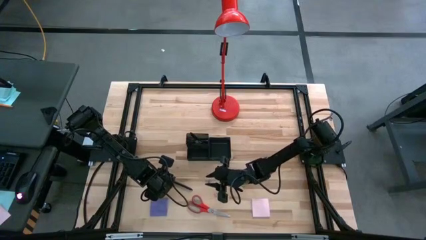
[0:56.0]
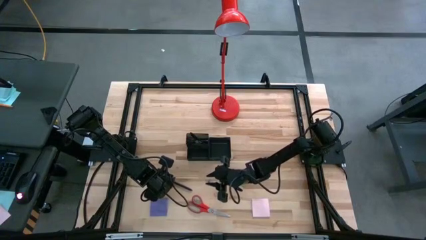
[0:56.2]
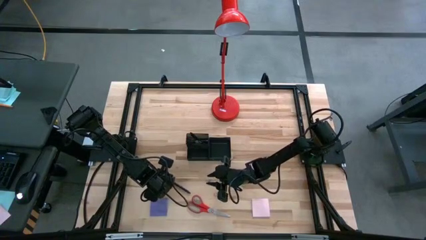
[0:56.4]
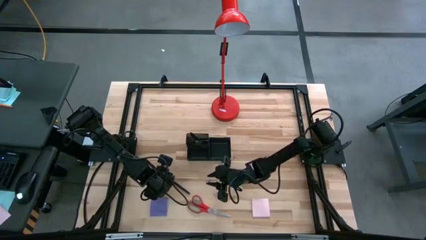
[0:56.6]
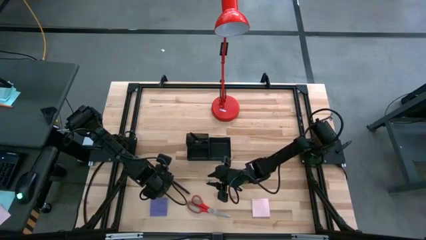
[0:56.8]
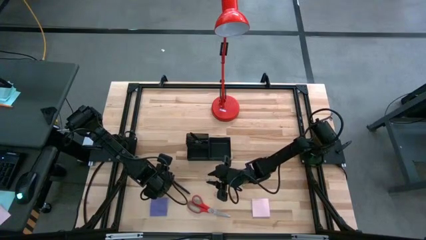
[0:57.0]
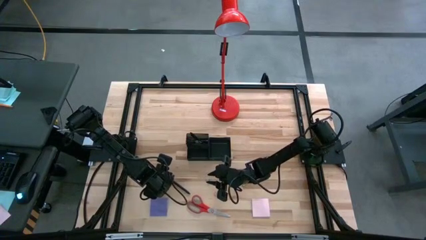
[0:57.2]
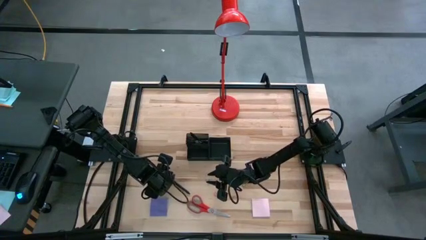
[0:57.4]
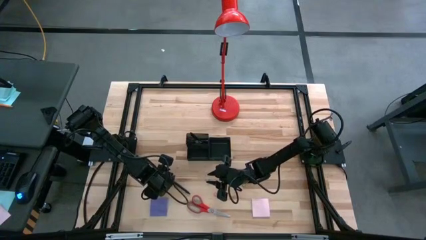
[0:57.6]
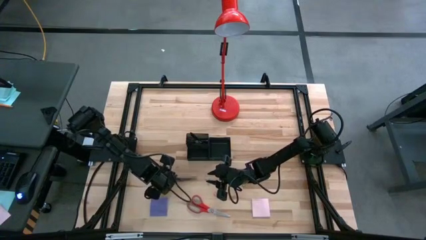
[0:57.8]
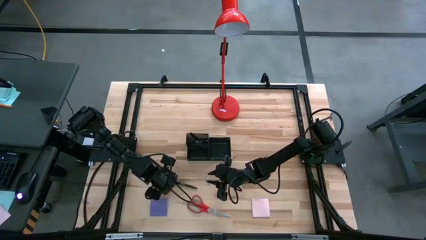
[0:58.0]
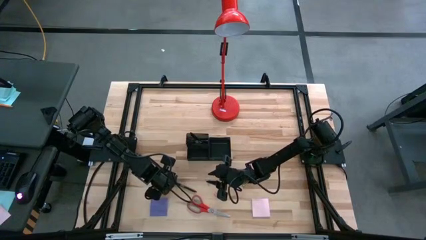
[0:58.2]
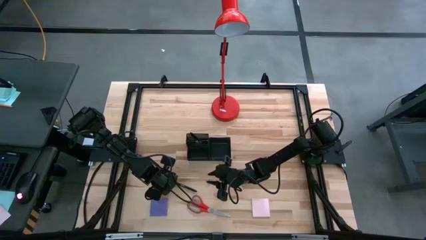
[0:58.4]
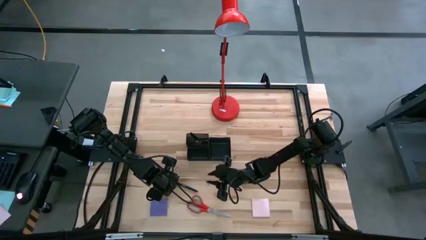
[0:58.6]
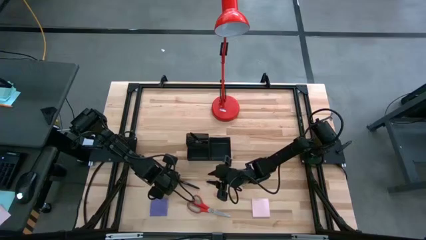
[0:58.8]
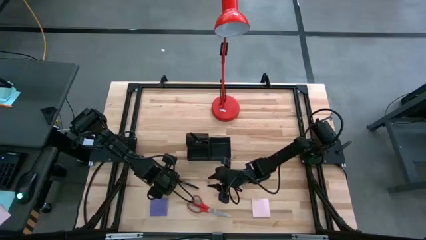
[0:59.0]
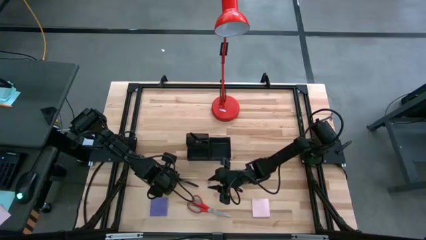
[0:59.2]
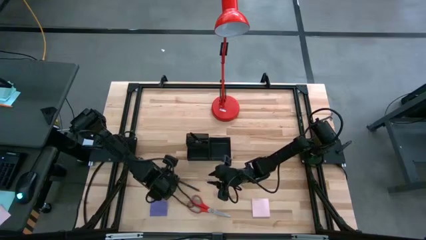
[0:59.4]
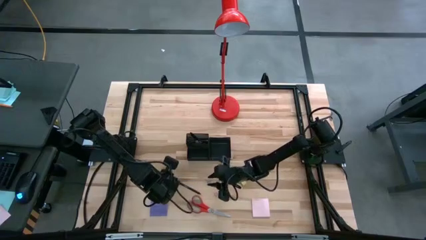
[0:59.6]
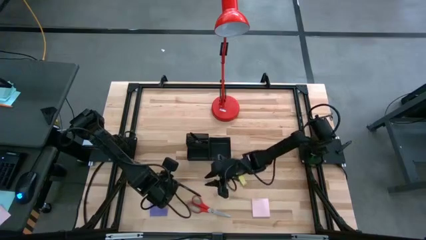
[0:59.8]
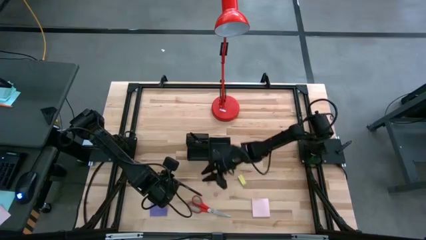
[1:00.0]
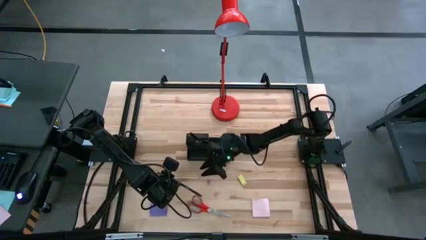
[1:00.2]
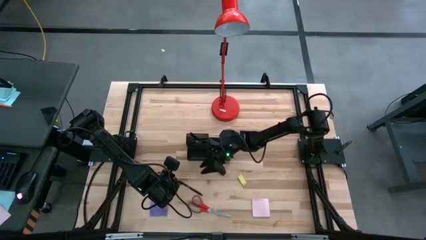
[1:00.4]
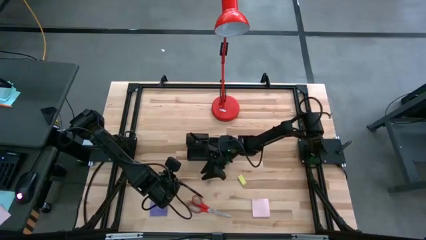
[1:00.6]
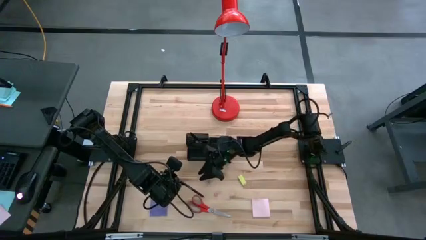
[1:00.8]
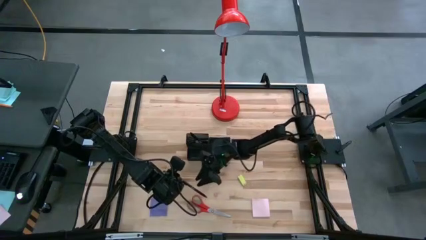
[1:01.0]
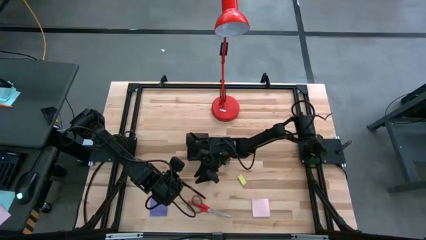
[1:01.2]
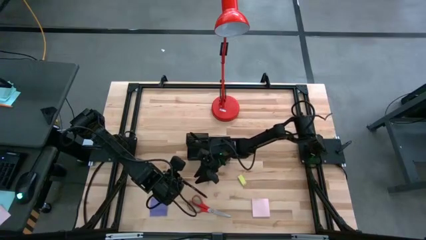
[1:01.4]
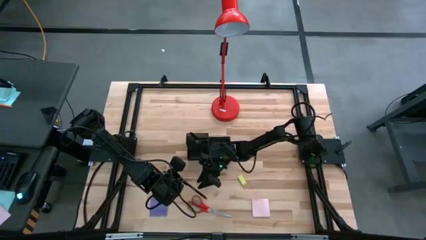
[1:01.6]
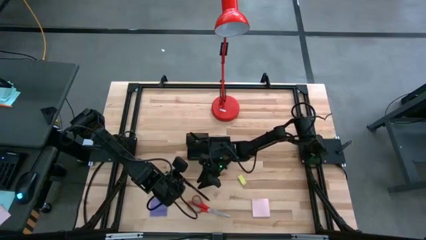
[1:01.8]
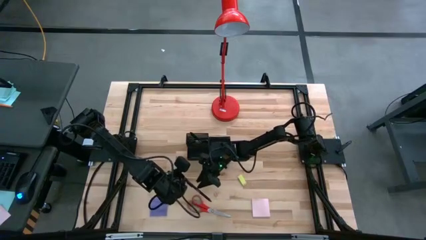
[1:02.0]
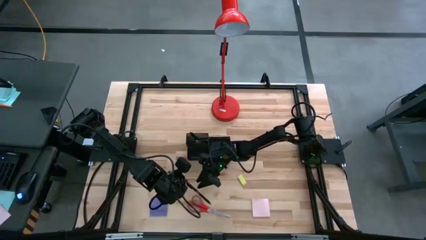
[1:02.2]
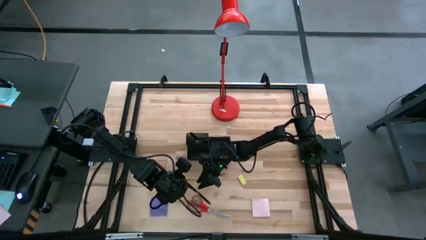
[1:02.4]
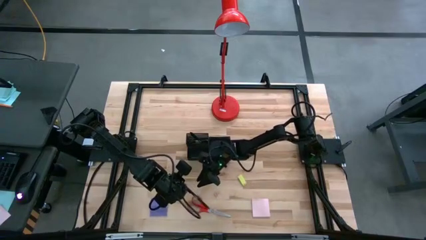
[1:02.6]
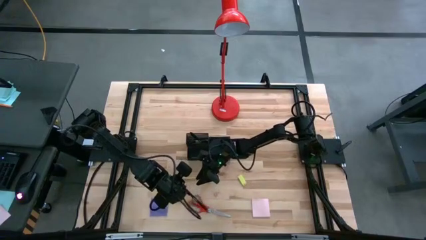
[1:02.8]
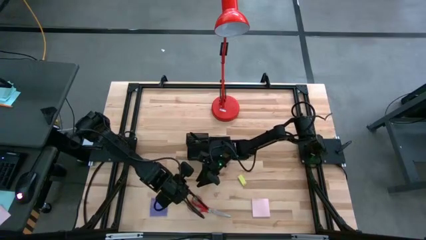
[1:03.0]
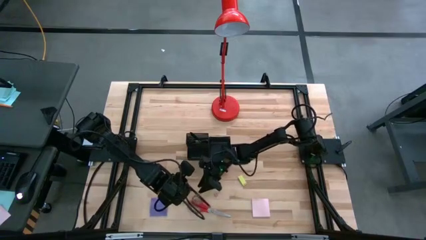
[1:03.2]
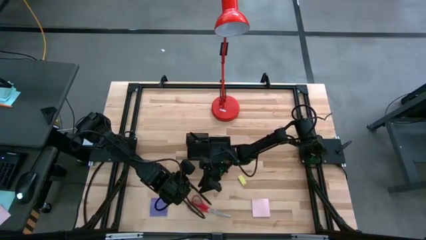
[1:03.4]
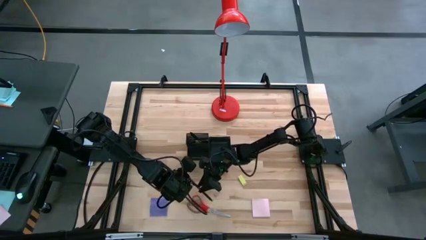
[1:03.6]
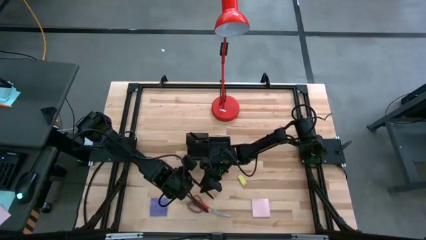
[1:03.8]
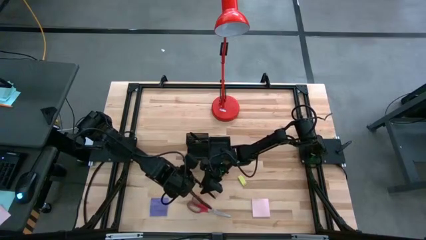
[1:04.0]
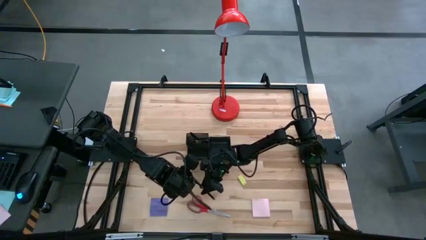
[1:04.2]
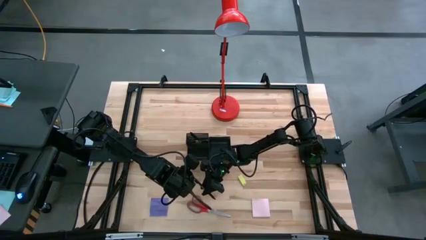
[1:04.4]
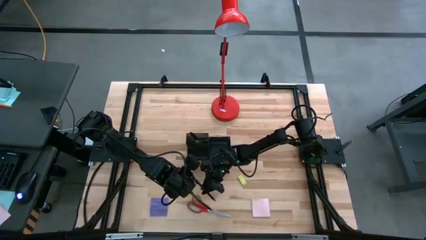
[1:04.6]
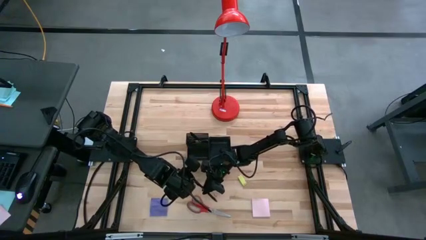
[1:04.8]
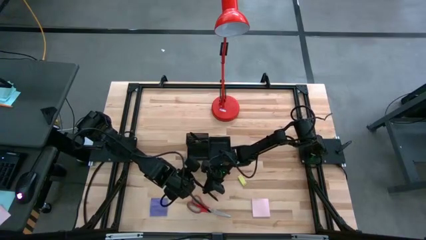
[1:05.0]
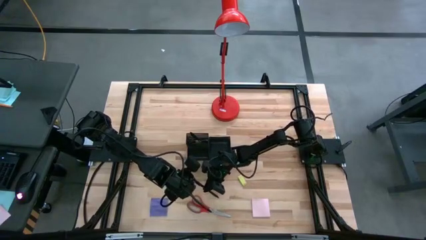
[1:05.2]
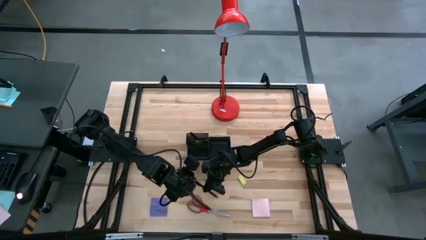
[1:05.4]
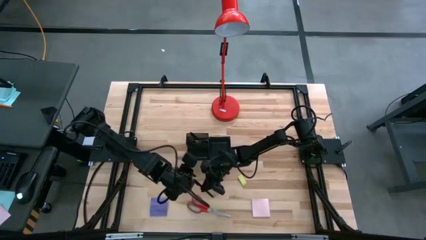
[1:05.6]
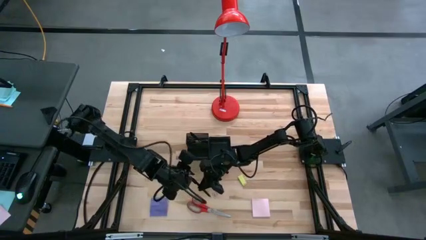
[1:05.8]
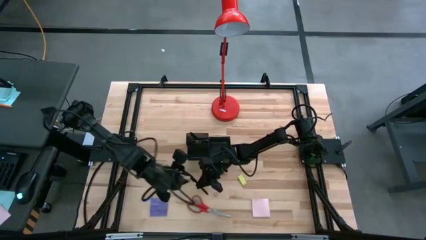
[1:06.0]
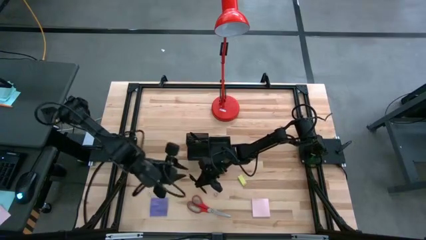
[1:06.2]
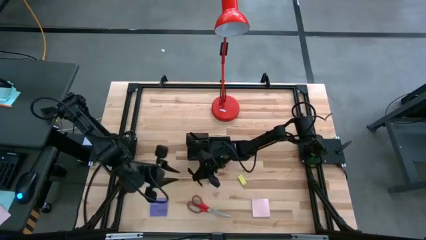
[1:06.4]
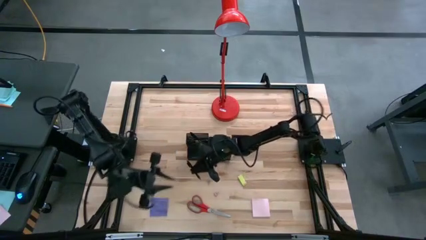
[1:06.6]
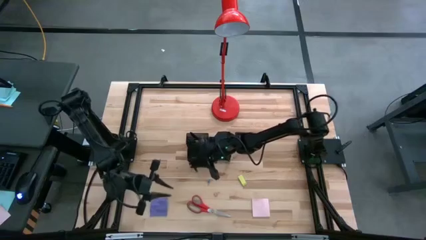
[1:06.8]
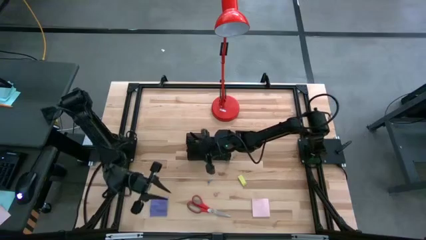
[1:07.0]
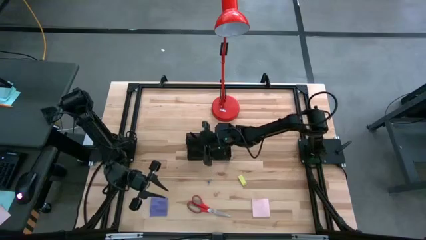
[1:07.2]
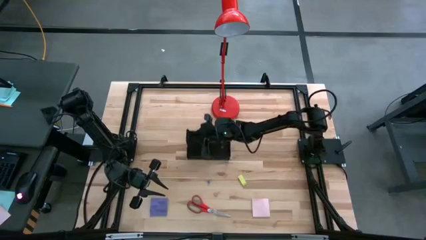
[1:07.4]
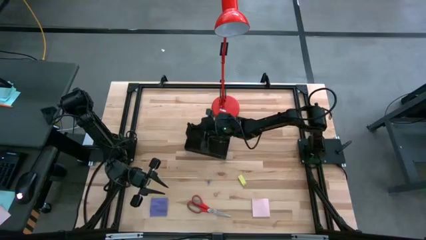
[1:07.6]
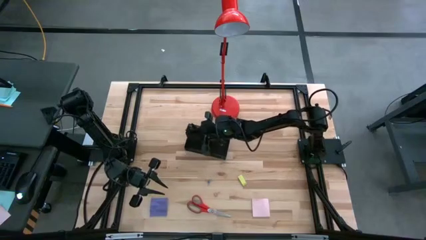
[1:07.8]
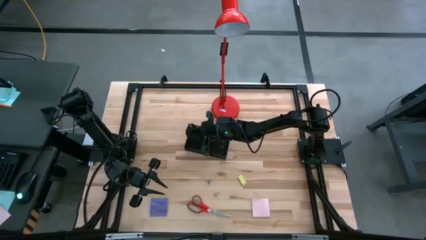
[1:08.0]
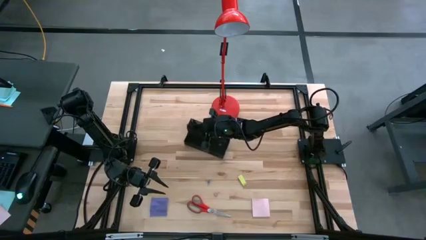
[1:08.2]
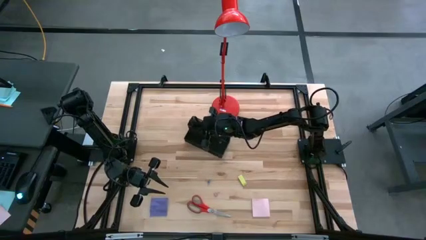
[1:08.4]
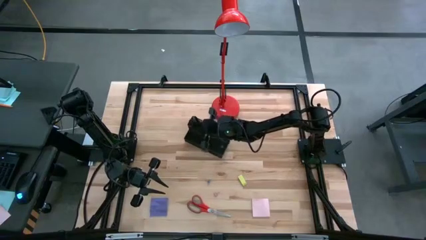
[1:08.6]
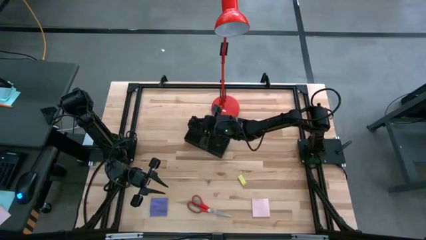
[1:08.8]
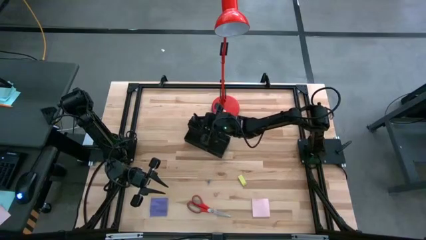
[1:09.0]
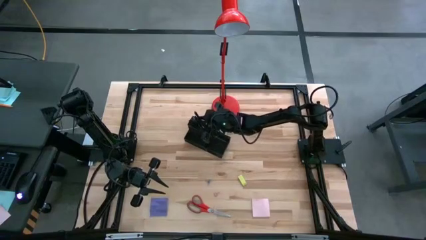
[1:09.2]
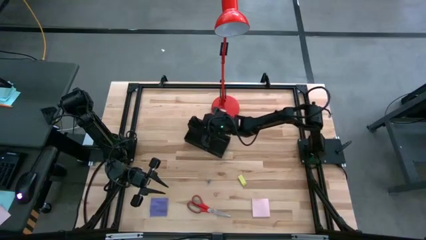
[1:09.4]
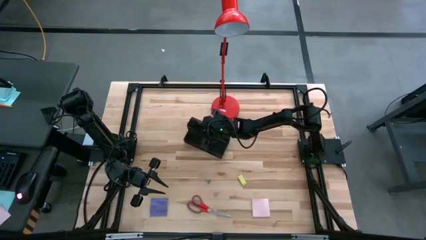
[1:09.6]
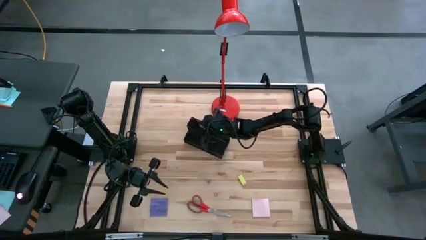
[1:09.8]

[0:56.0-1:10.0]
Task: Pick and place office supplies into organizer
Put the black pen into the desk organizer
